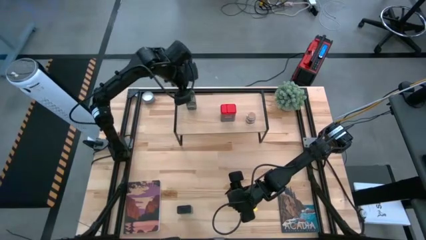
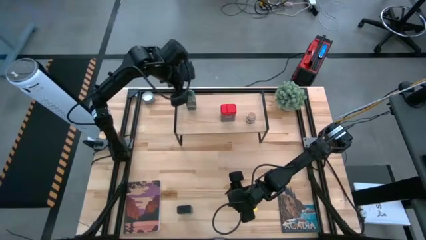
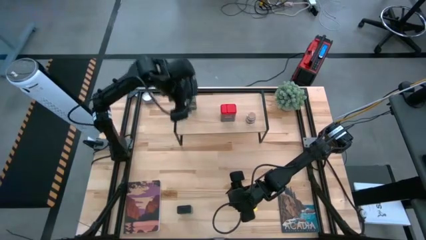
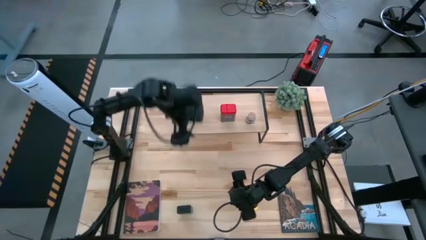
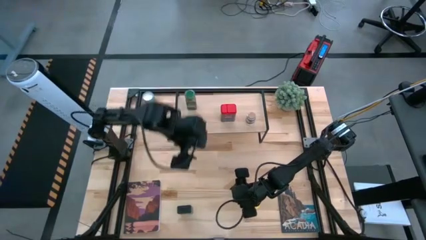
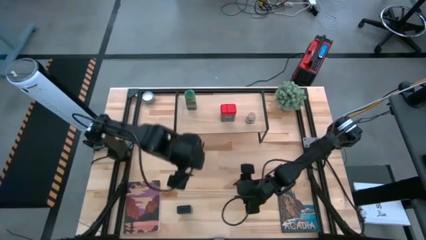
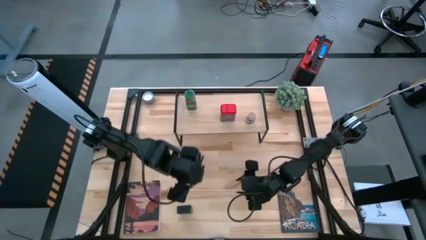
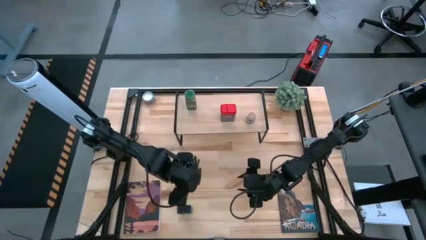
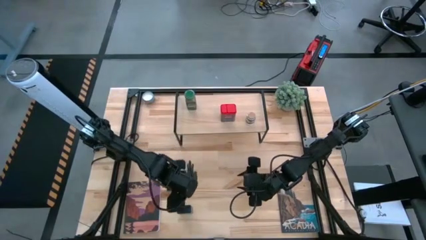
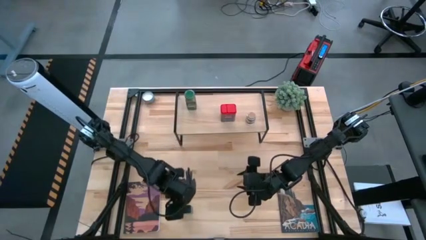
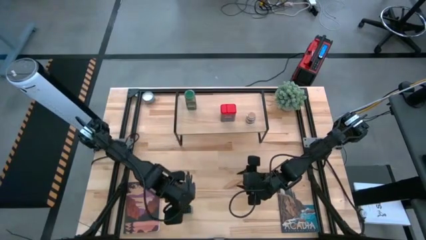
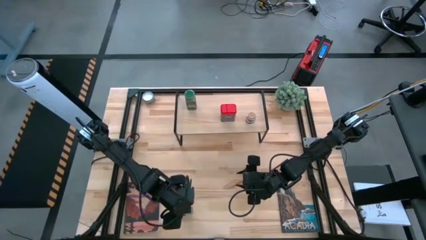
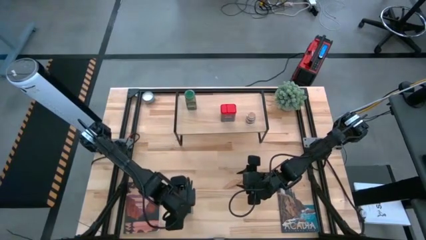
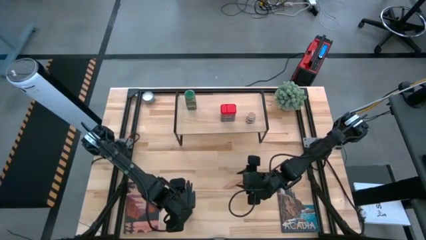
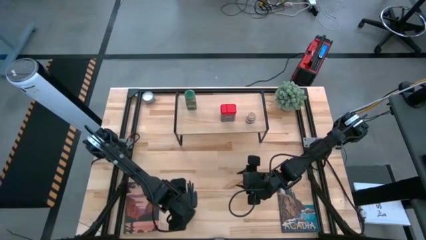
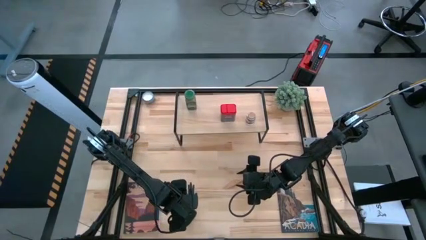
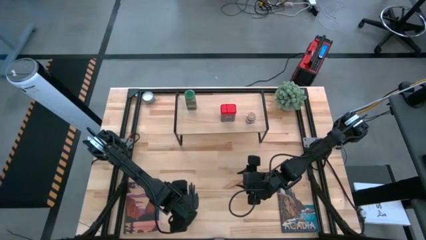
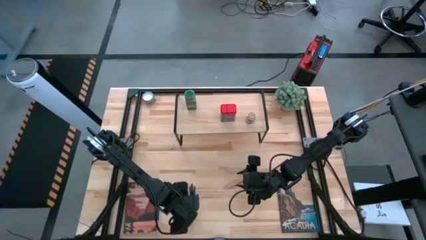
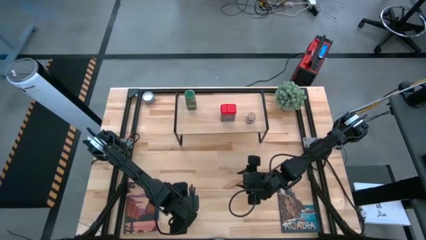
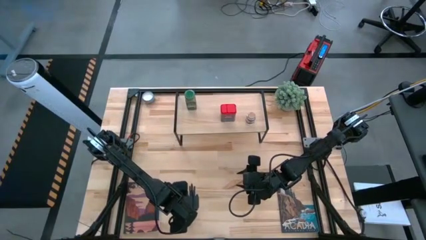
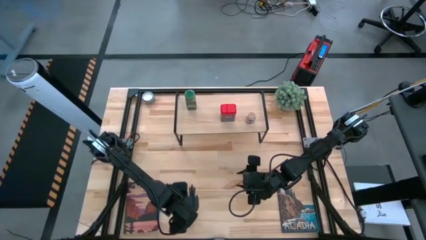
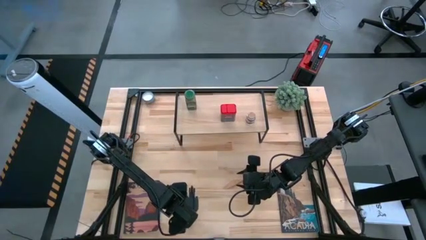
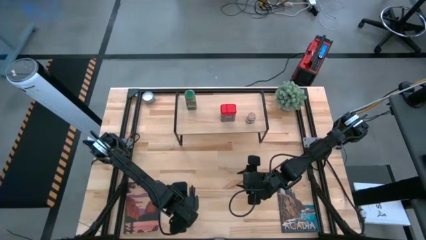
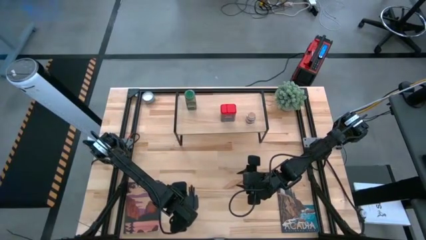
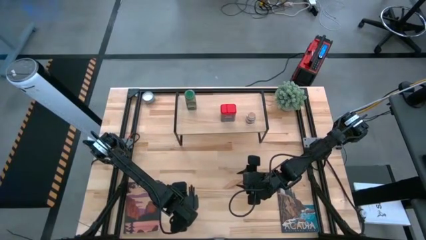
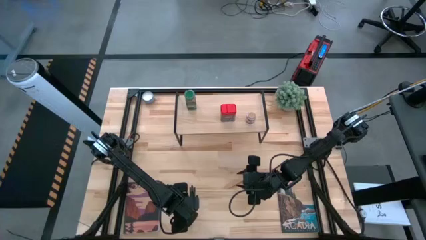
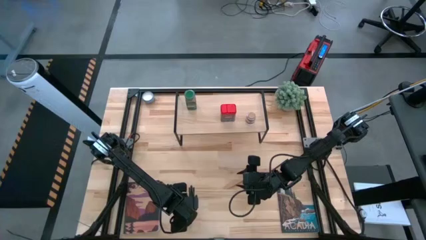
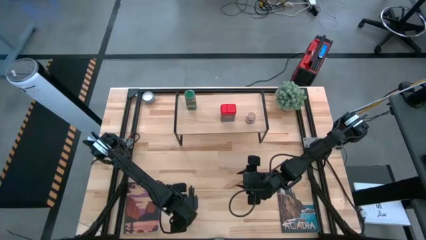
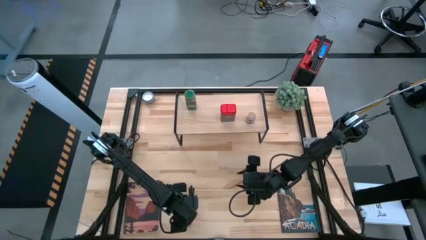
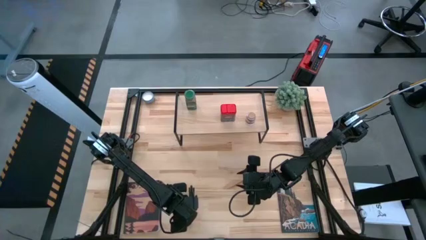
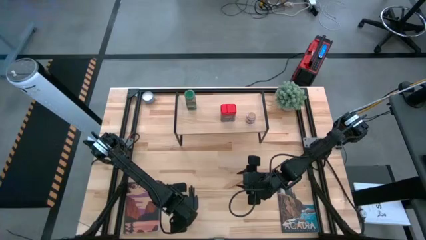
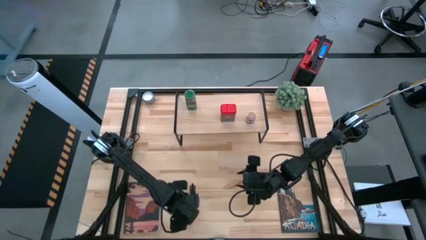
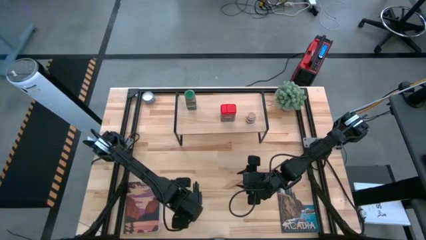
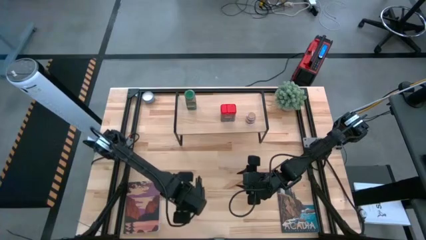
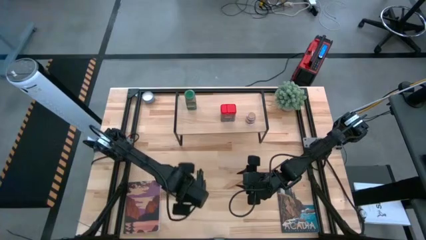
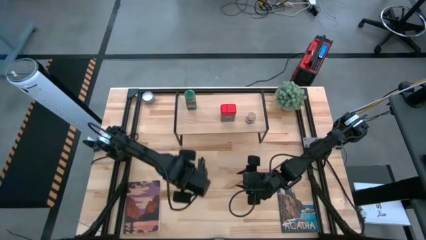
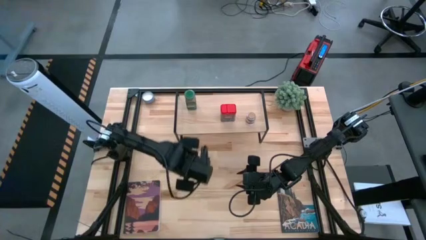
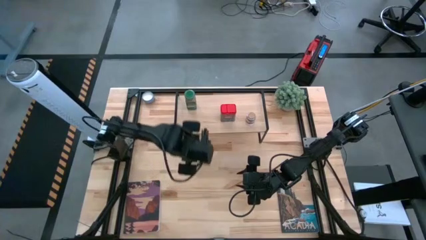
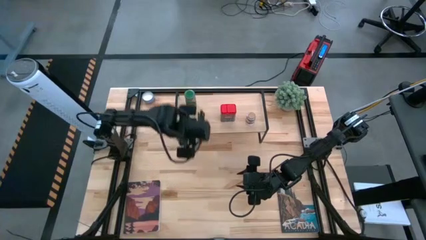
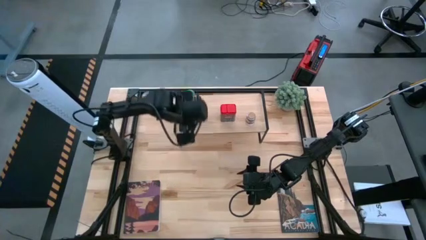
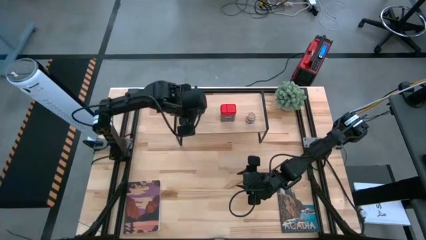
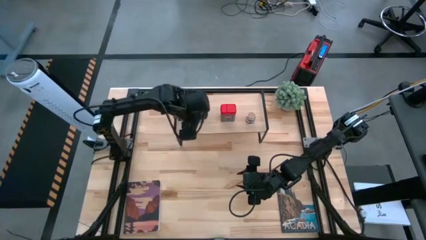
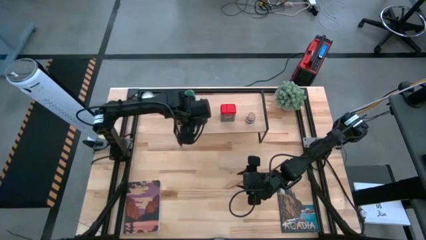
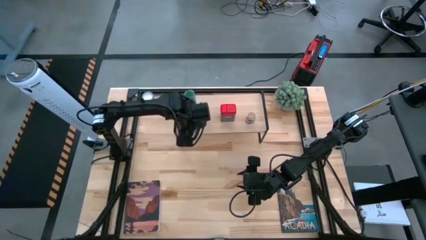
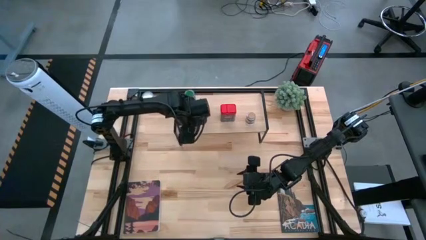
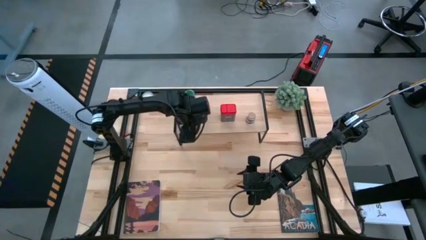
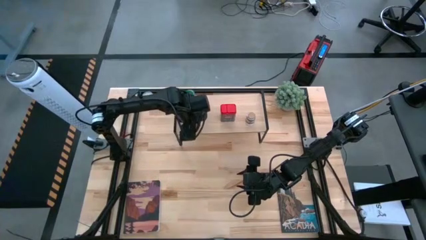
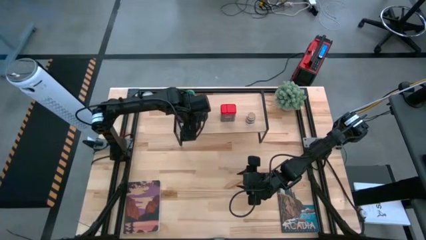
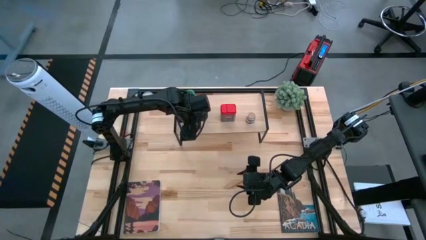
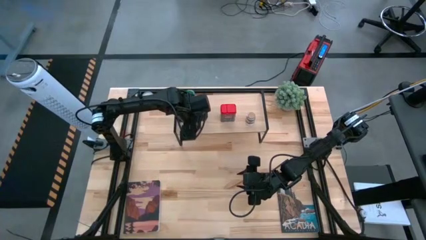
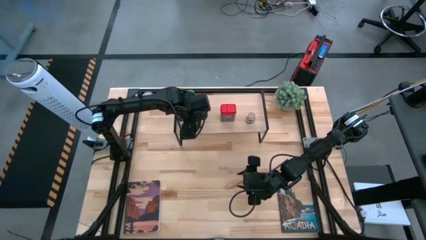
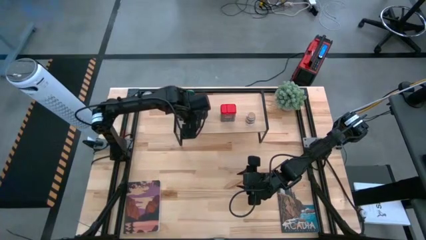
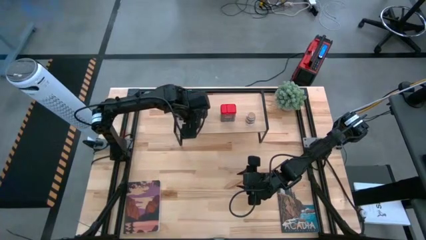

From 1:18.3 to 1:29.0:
Task: Shelf spices
Put the black seasoning can on the shelf

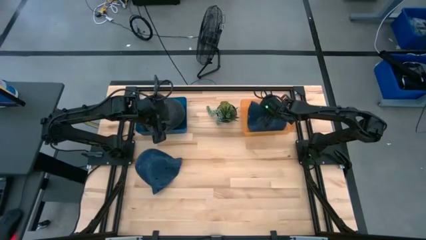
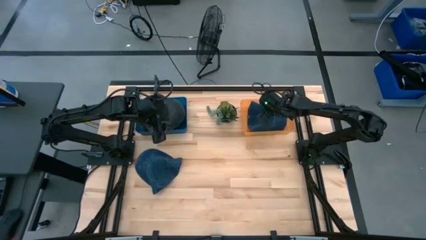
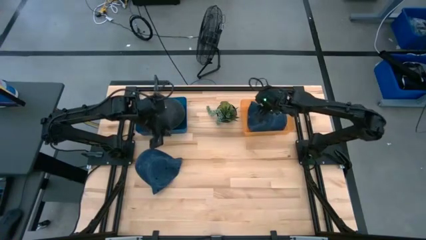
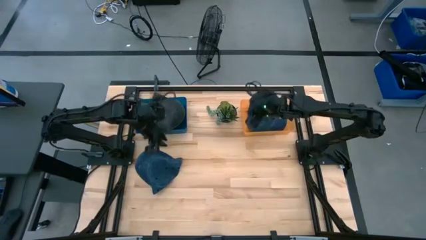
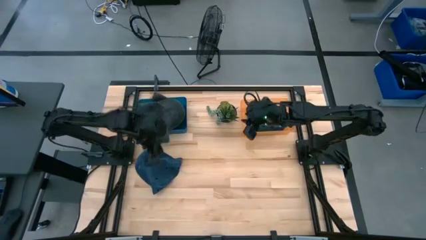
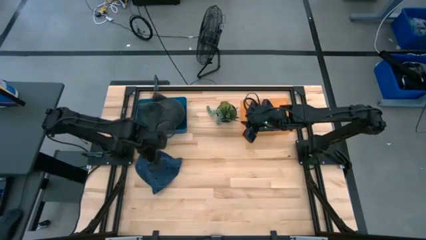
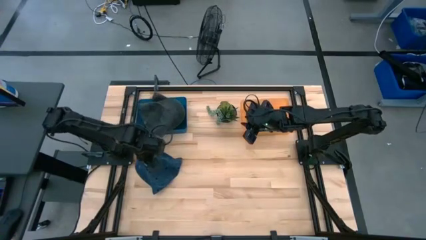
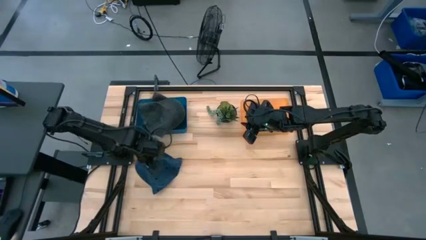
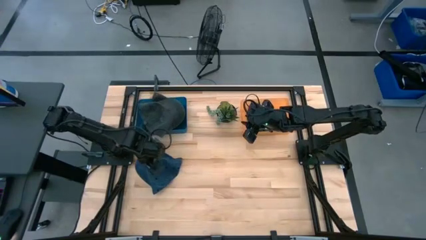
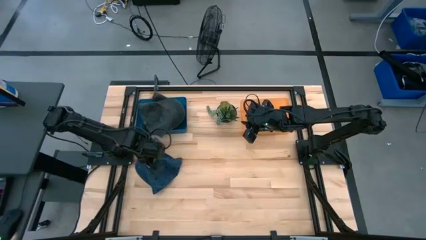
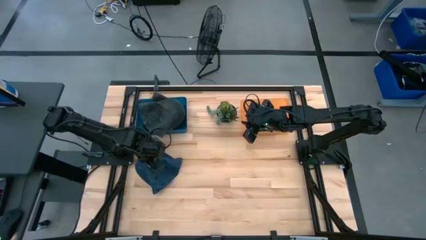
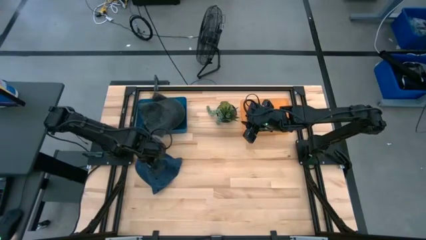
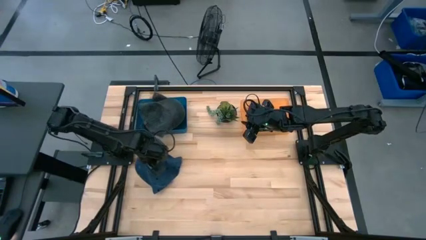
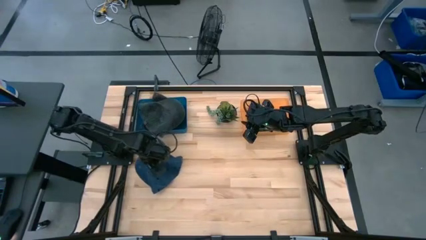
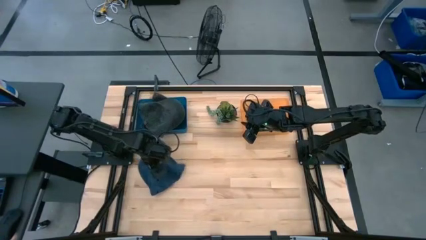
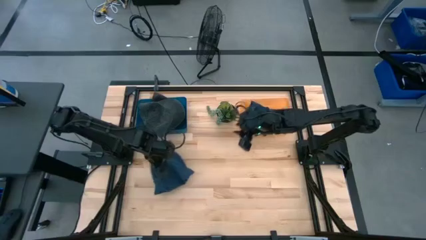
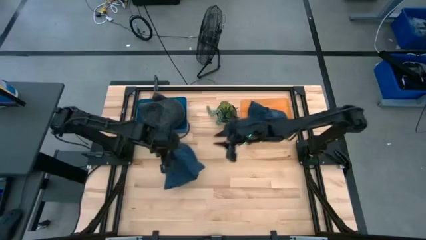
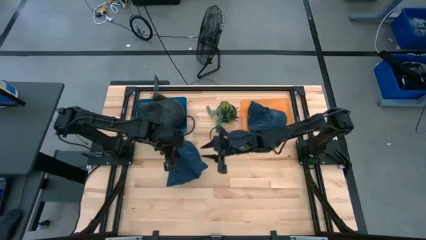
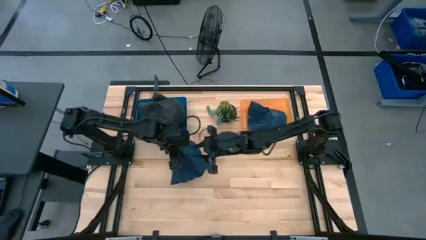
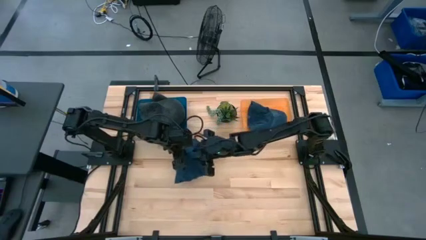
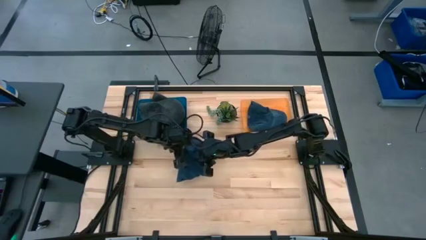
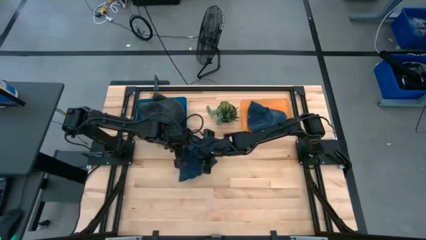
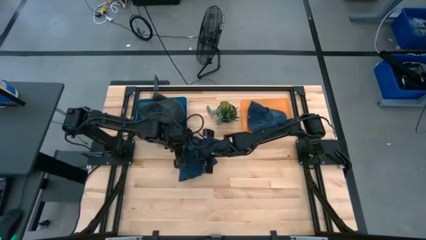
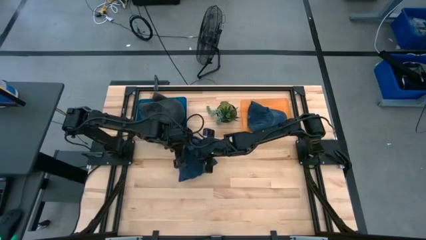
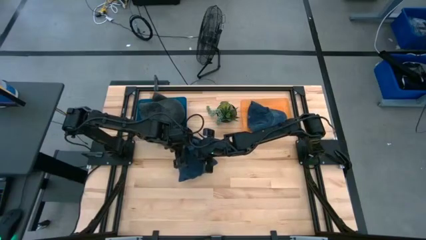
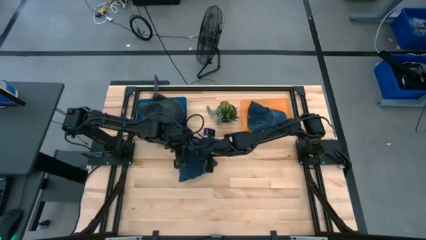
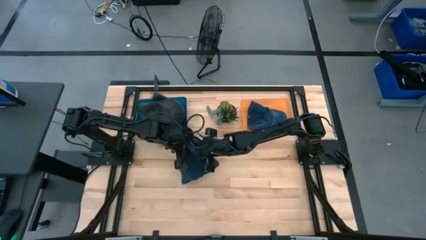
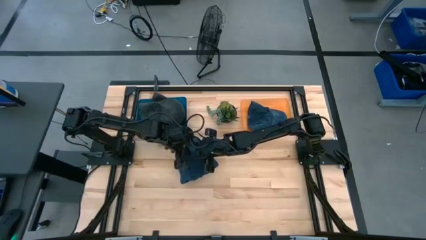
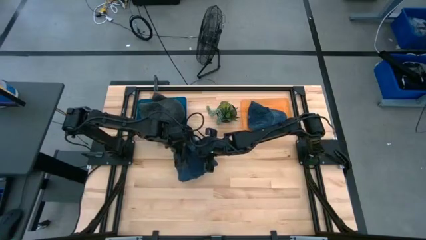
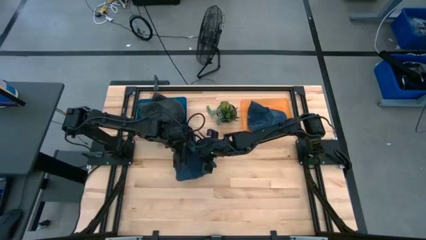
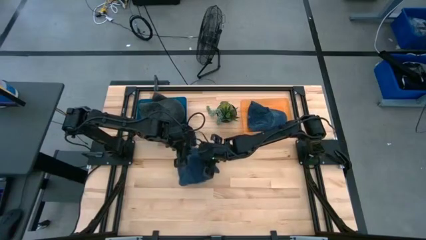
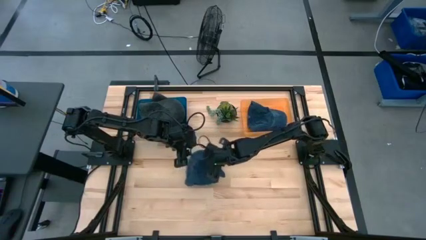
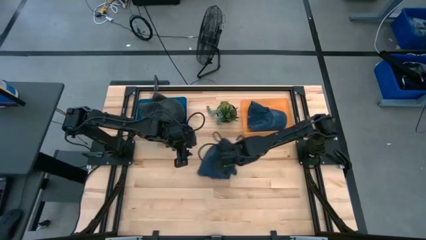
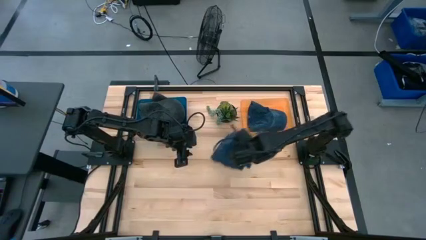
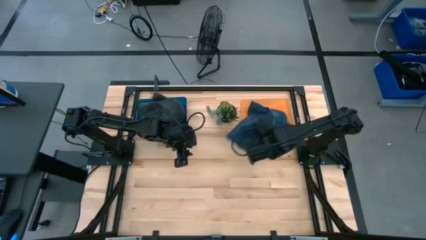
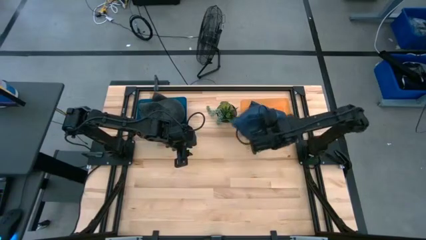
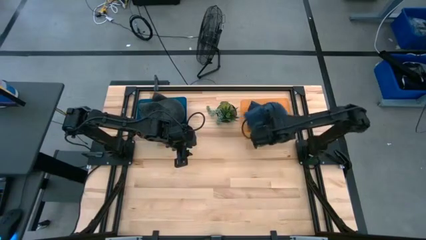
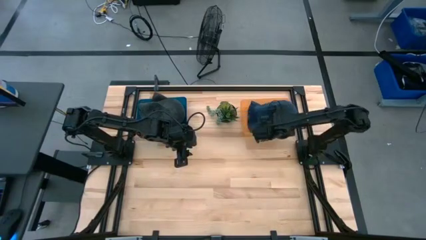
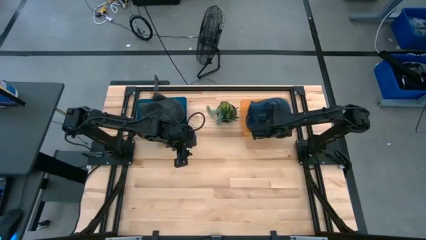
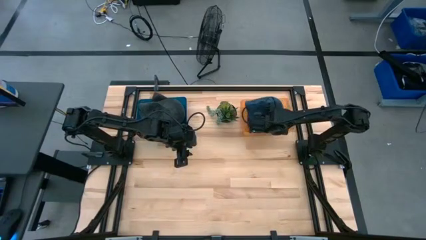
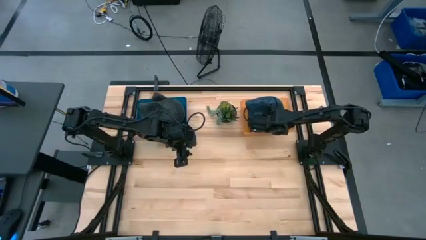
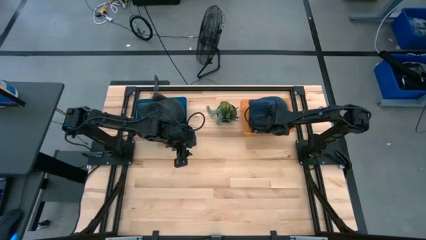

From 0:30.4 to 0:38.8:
Task: Pick & Place hat
Put the blue cap into the orange bin
